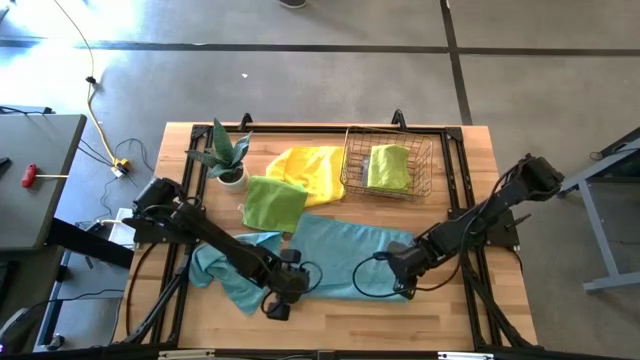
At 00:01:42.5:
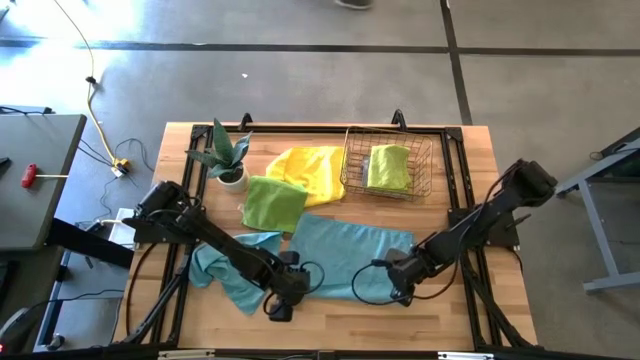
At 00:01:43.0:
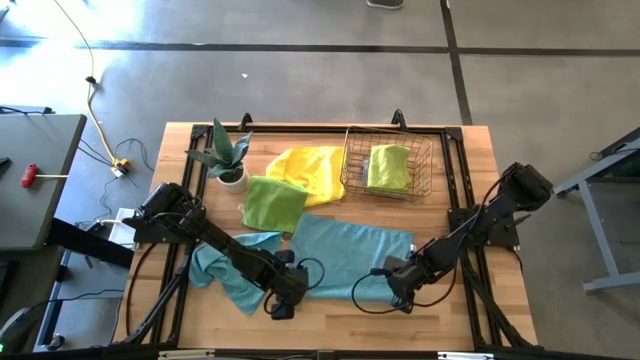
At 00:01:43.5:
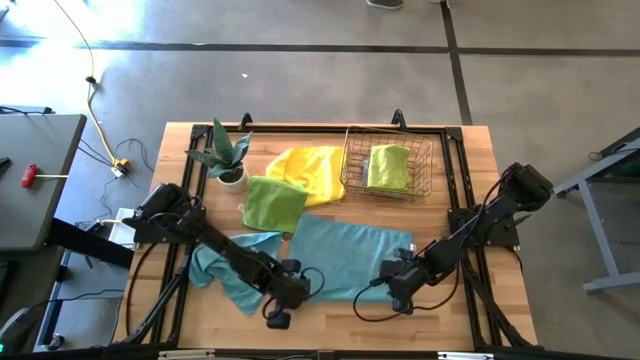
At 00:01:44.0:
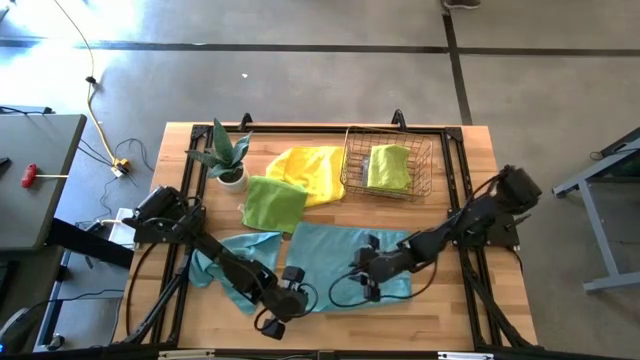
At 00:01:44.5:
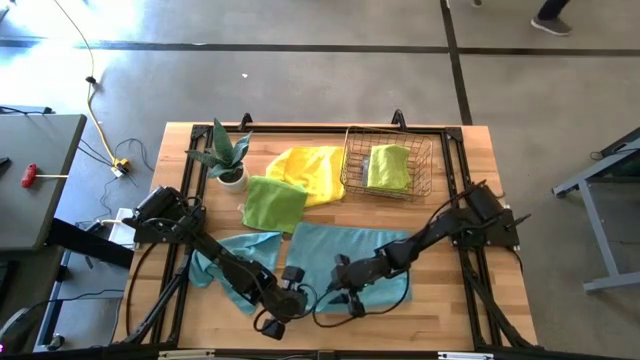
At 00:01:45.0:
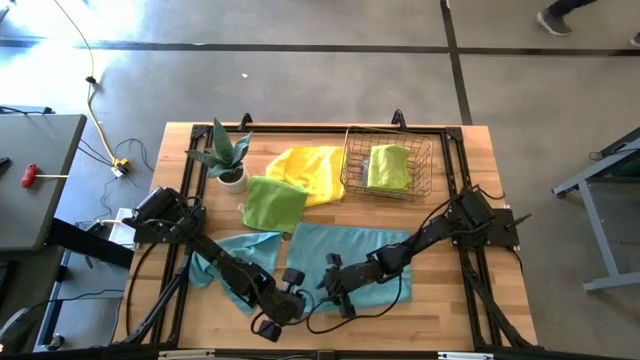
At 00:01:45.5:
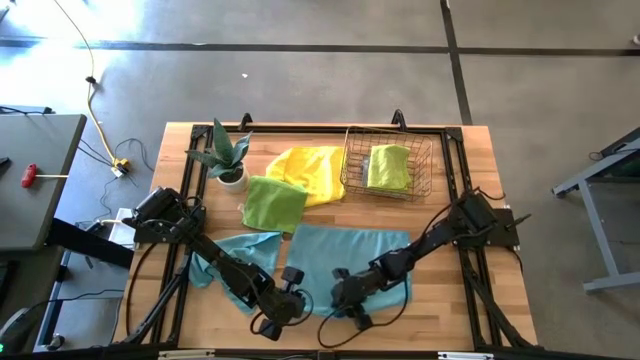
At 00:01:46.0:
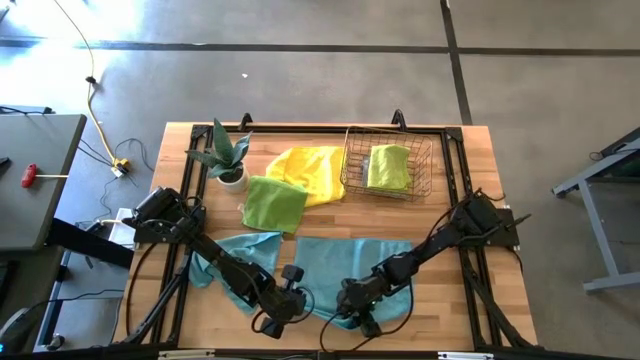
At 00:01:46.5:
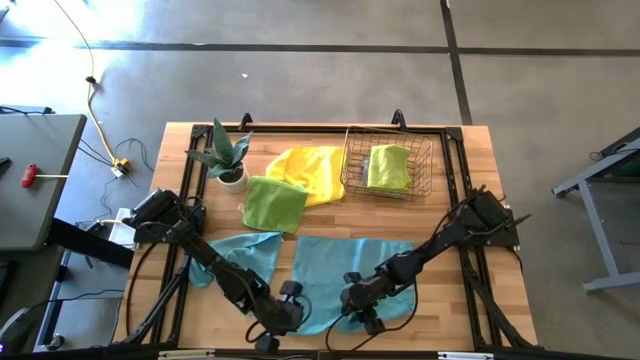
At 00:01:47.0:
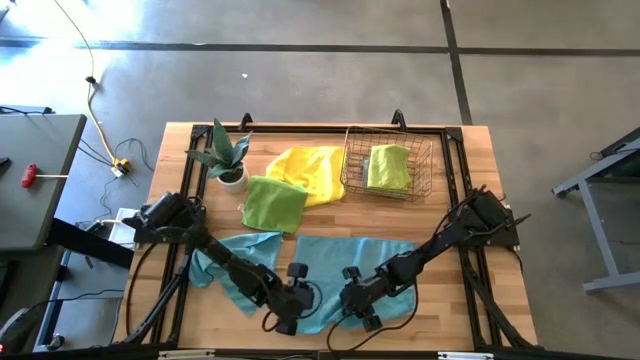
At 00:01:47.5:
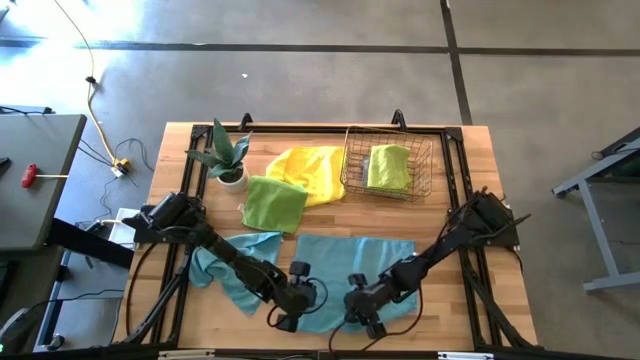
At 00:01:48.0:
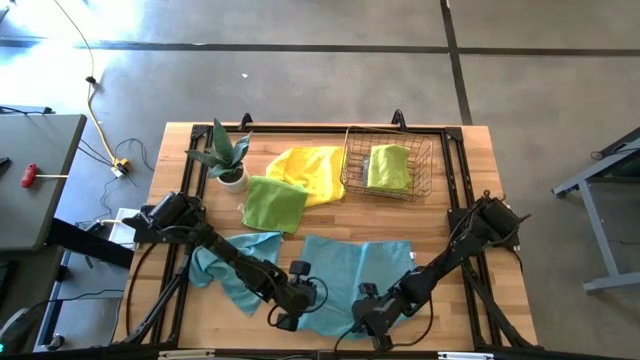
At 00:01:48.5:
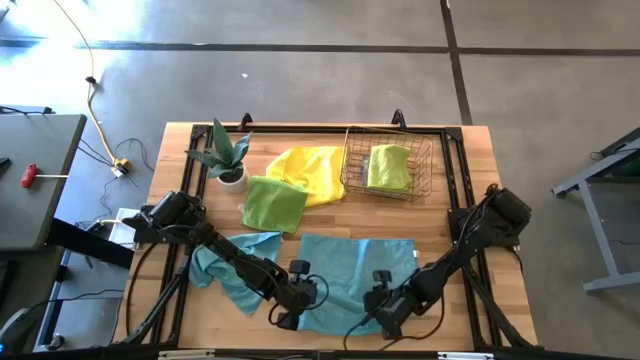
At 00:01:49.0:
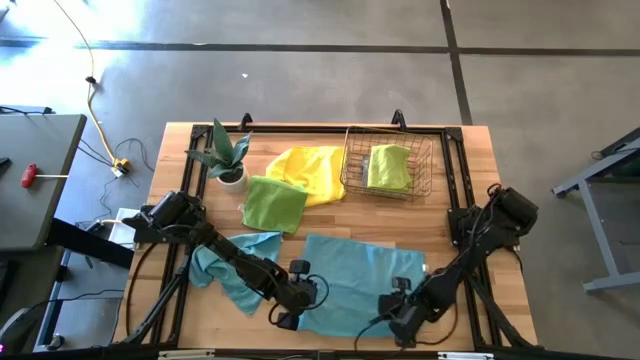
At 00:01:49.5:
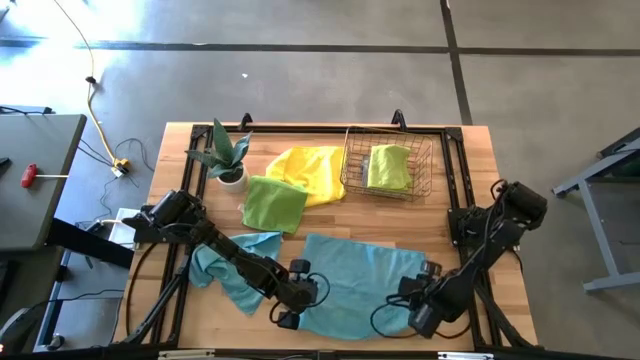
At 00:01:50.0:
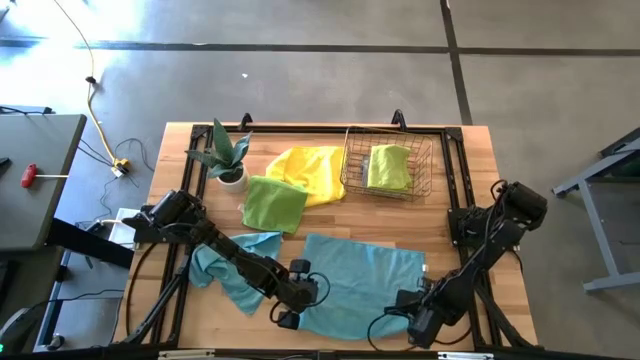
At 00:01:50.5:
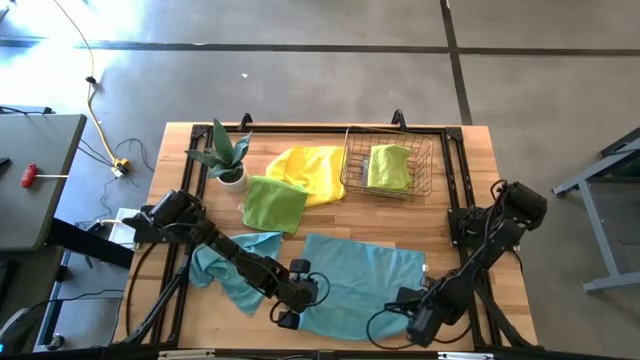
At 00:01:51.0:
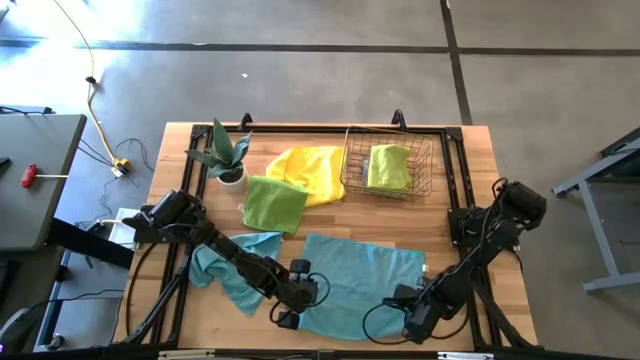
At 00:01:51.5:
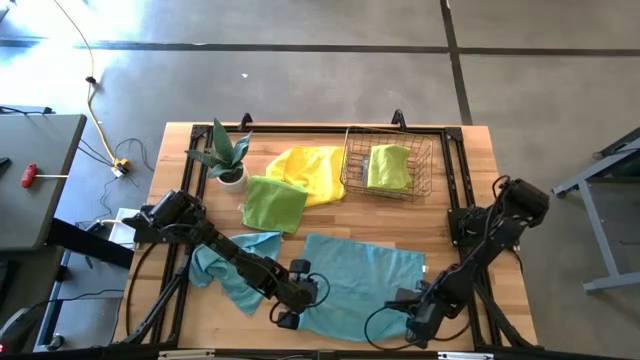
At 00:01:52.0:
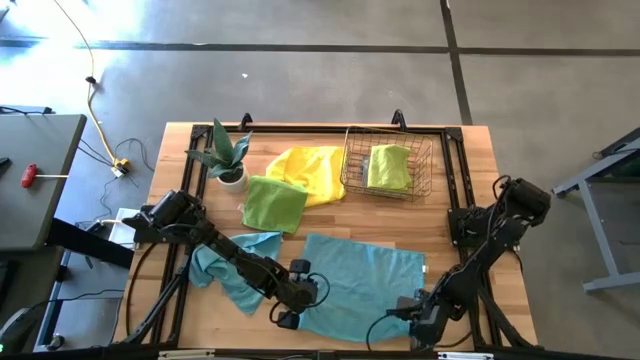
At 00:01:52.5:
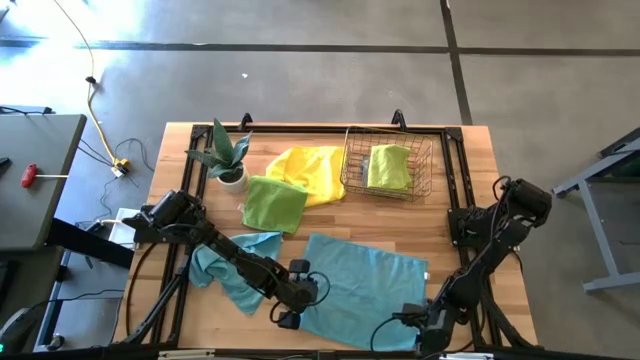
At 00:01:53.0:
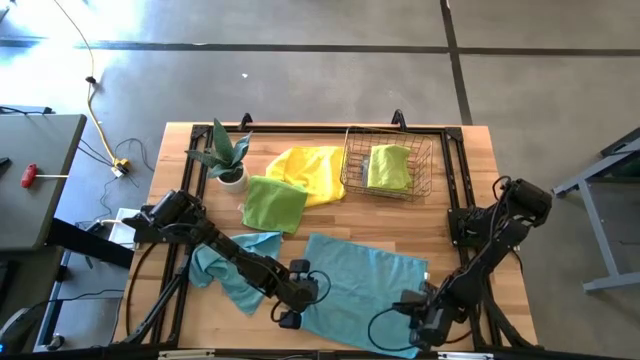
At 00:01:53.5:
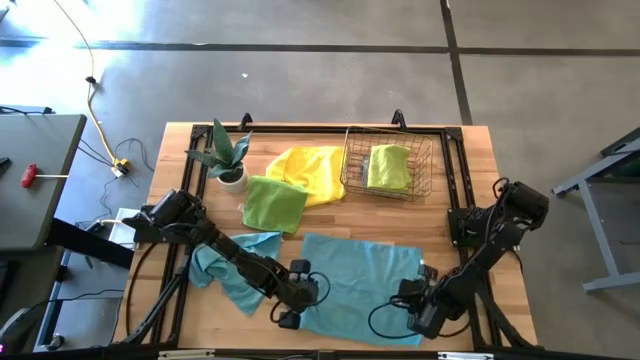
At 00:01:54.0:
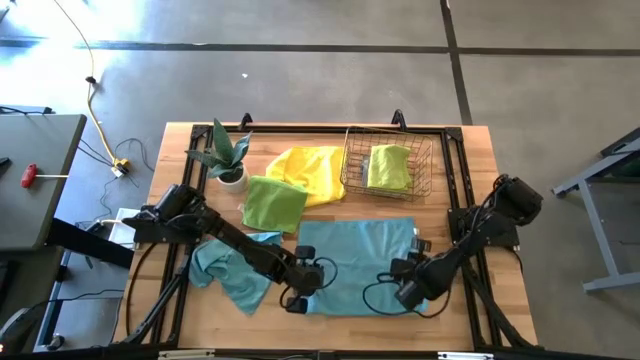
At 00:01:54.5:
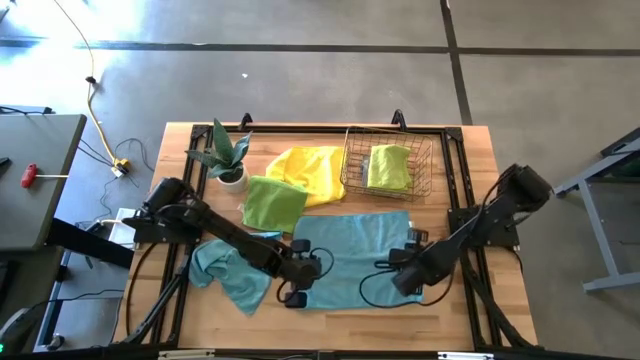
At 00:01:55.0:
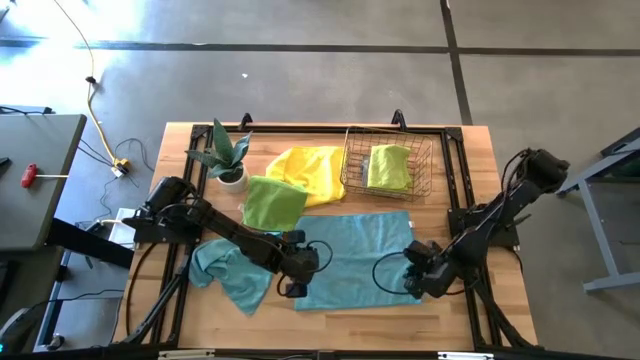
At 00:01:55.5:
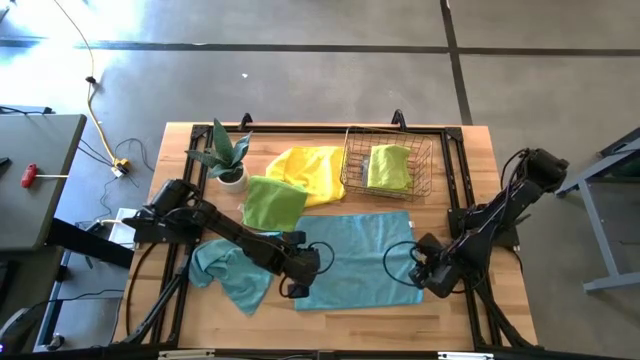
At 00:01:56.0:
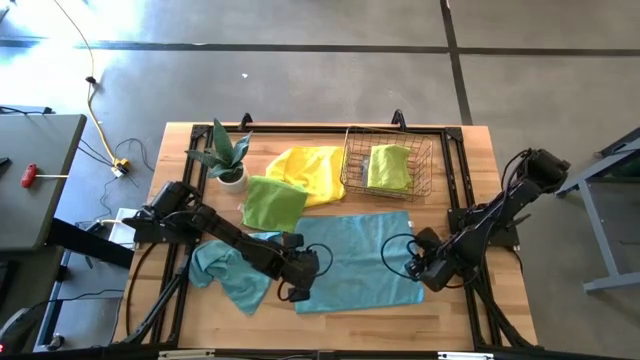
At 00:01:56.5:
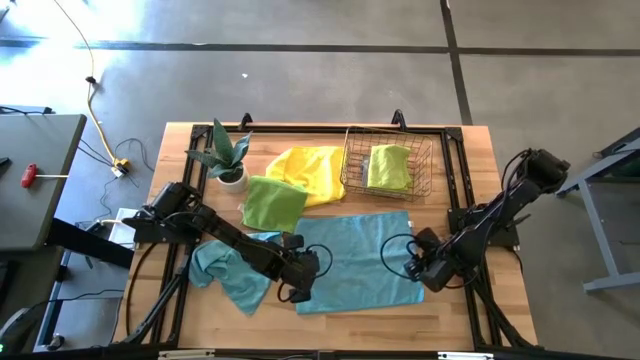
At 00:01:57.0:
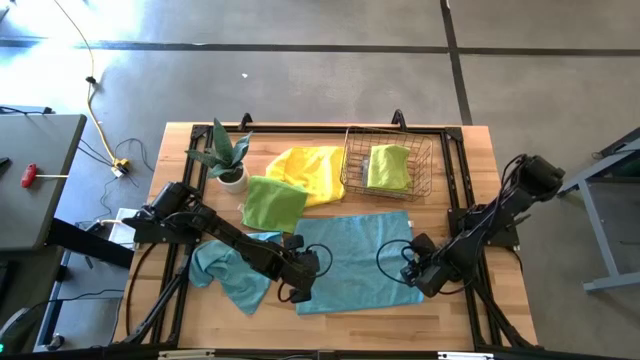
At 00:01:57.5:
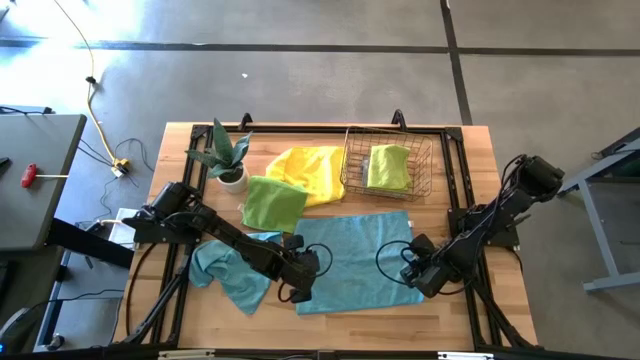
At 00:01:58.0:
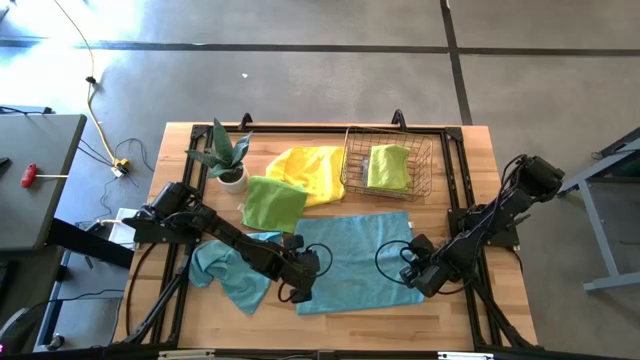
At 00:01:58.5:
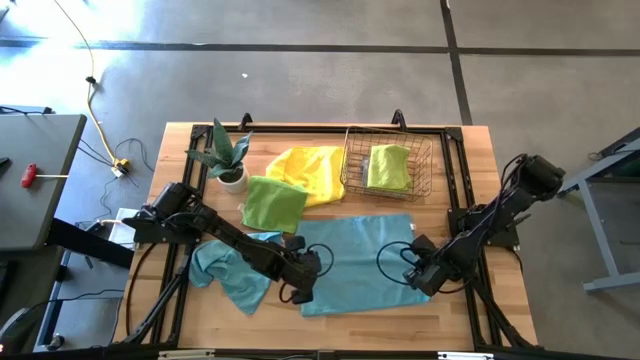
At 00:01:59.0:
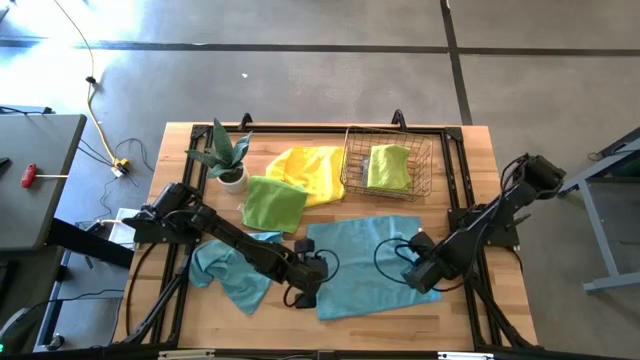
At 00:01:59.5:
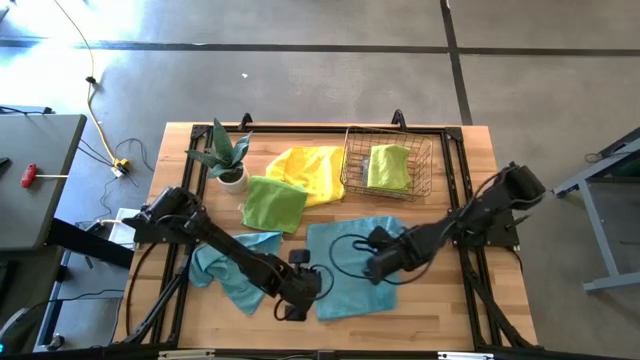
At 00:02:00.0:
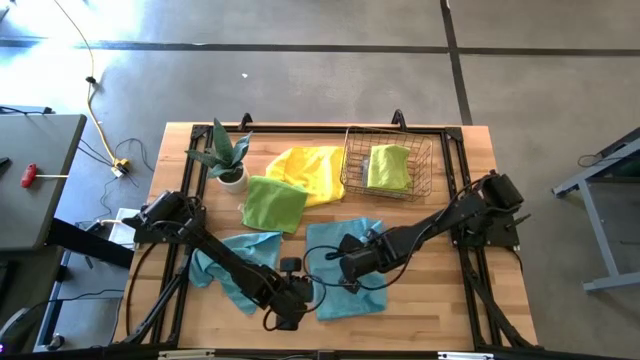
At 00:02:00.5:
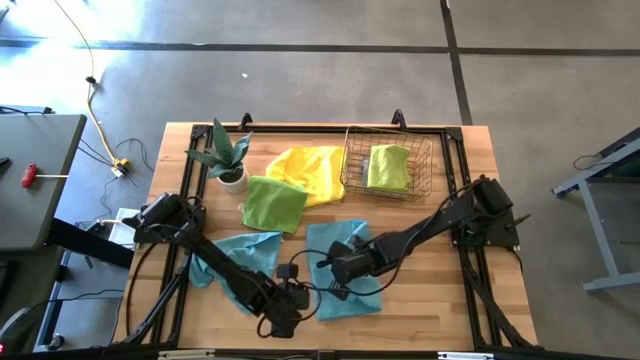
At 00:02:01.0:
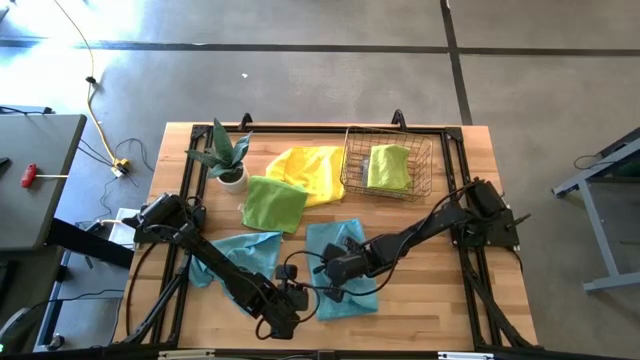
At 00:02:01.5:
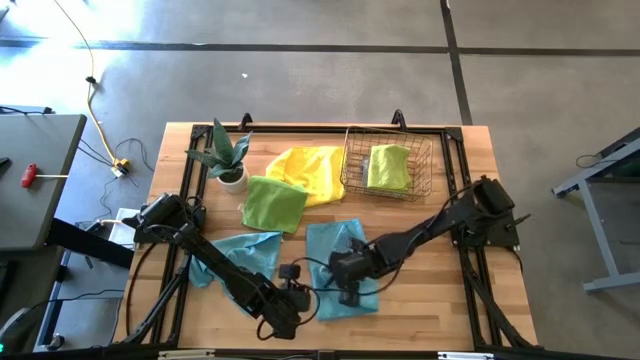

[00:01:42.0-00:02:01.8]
Task: Fold microfiber towels
Fold the right blue microfiber towel
